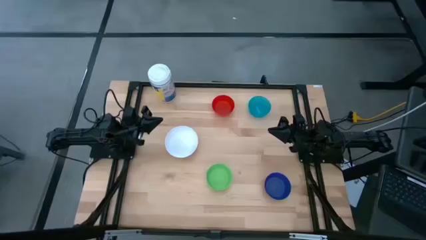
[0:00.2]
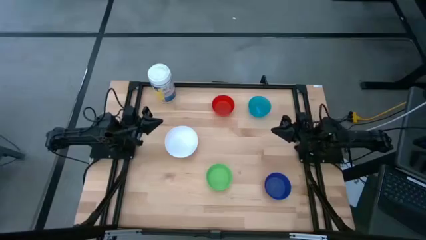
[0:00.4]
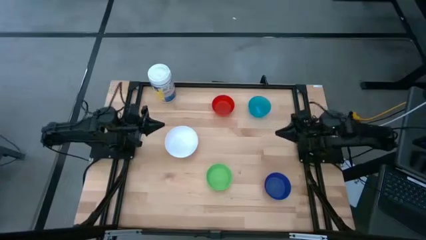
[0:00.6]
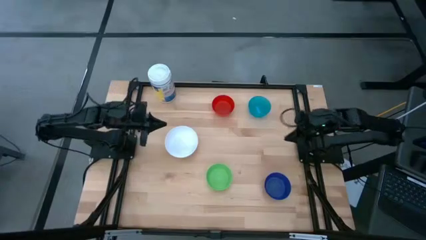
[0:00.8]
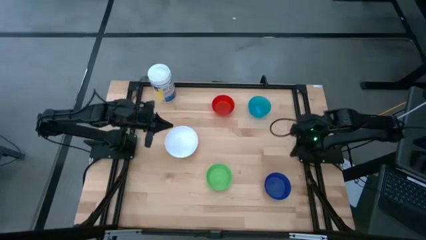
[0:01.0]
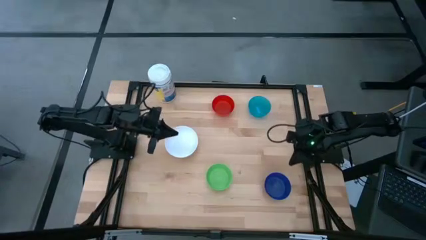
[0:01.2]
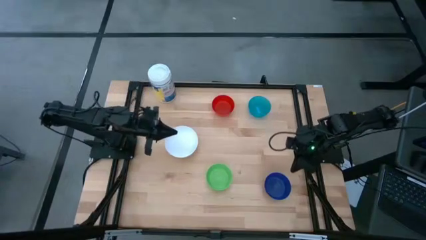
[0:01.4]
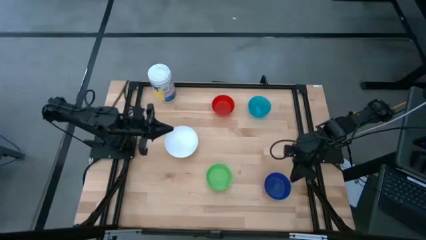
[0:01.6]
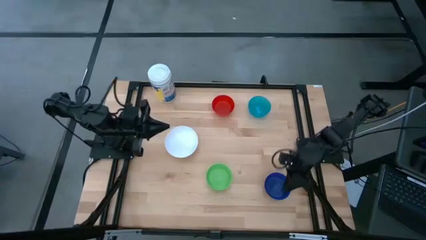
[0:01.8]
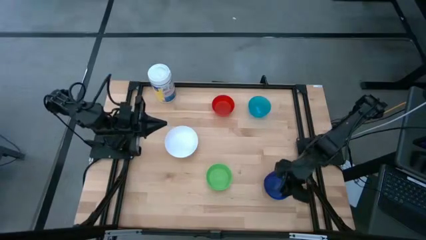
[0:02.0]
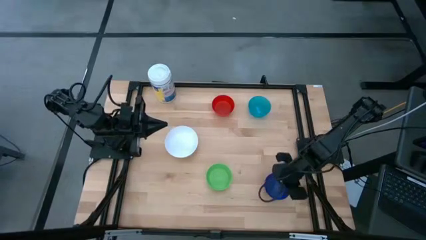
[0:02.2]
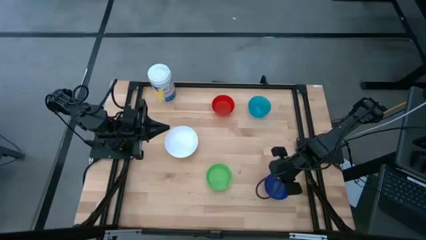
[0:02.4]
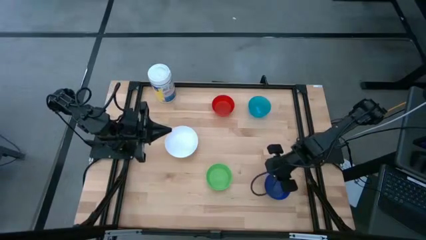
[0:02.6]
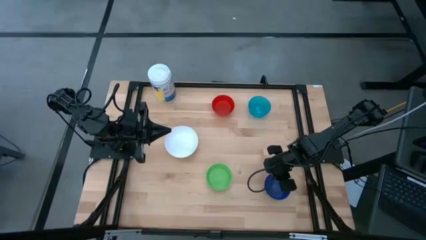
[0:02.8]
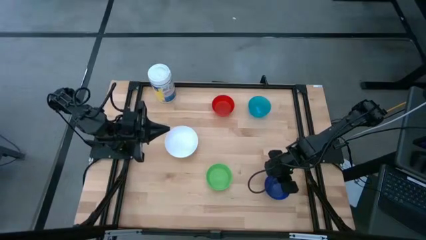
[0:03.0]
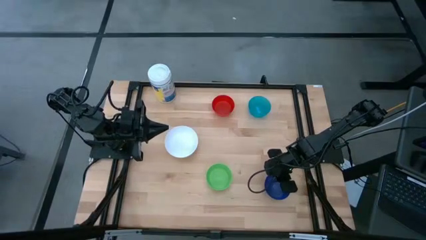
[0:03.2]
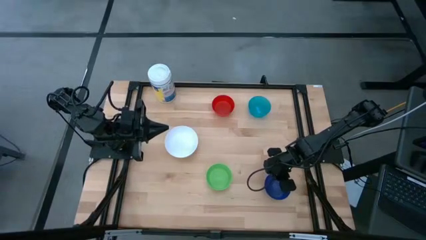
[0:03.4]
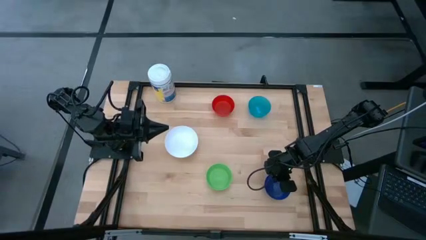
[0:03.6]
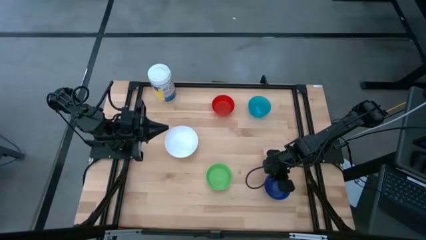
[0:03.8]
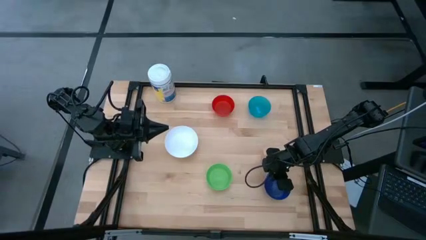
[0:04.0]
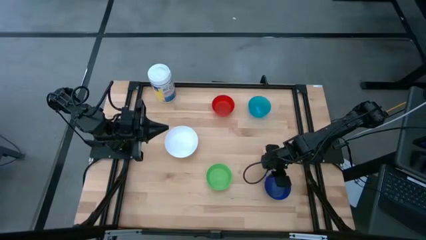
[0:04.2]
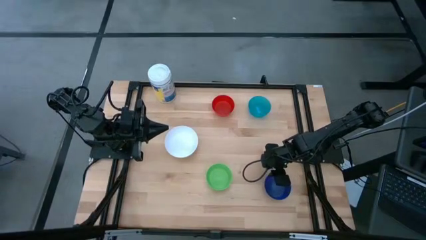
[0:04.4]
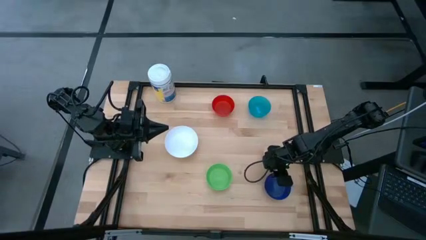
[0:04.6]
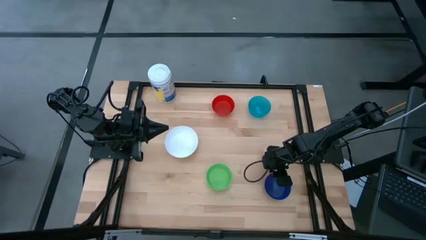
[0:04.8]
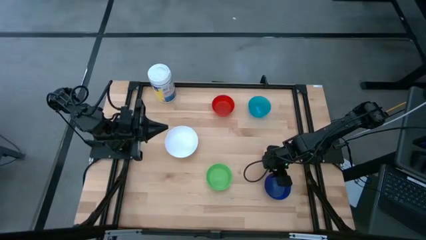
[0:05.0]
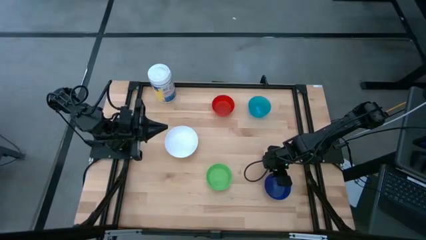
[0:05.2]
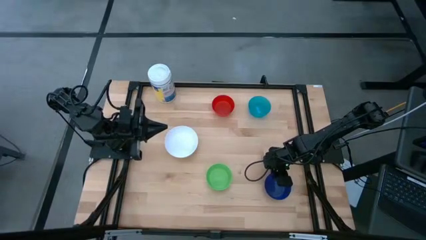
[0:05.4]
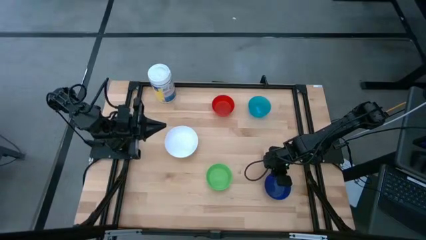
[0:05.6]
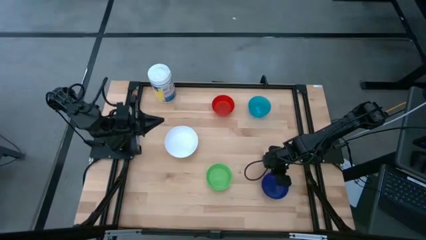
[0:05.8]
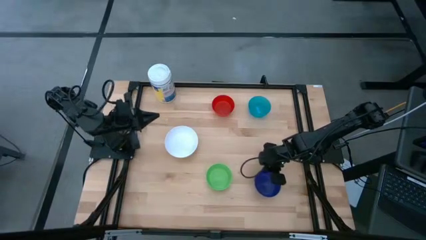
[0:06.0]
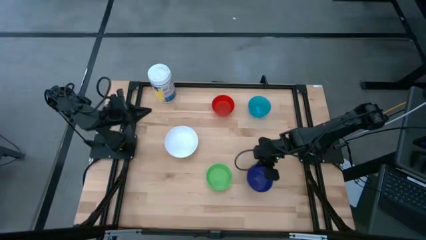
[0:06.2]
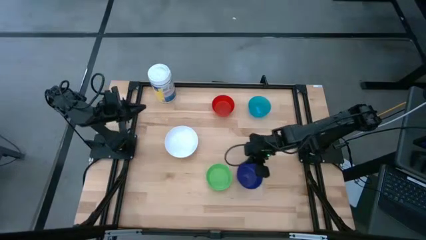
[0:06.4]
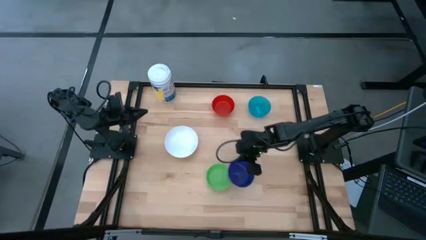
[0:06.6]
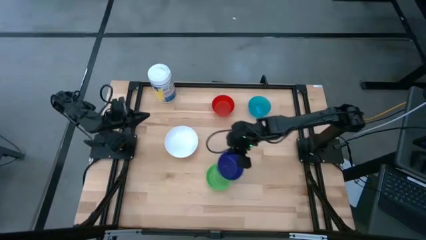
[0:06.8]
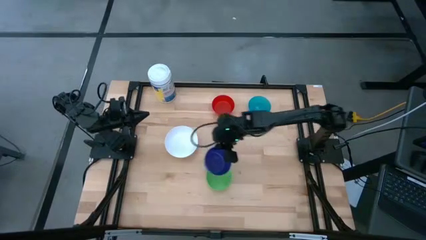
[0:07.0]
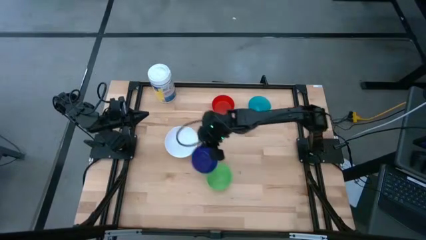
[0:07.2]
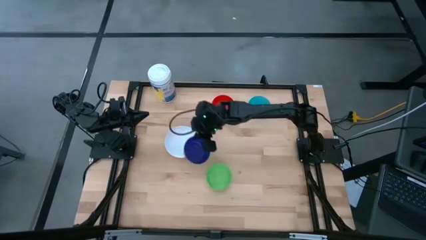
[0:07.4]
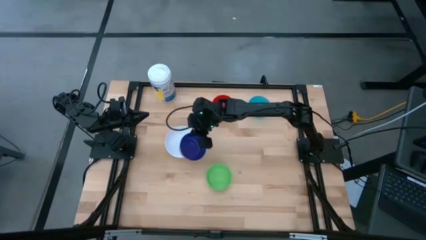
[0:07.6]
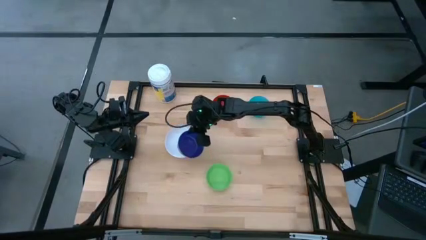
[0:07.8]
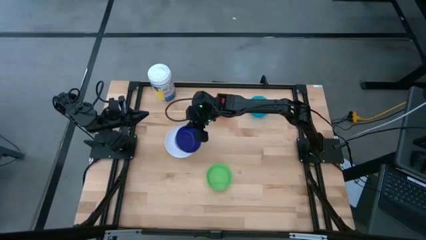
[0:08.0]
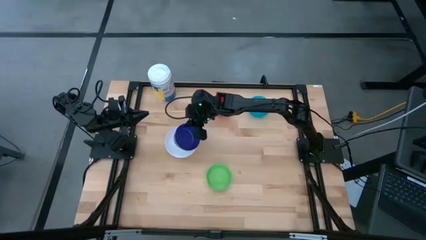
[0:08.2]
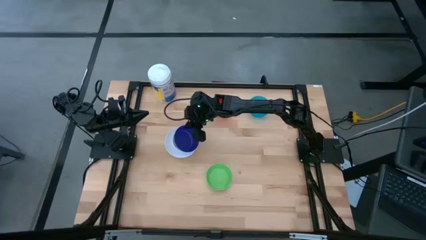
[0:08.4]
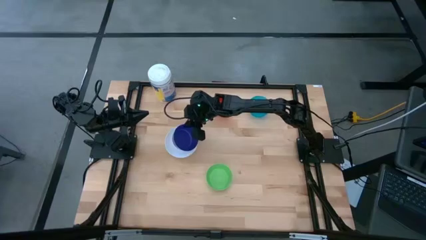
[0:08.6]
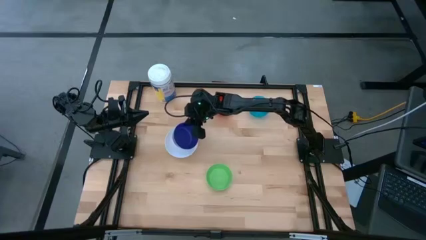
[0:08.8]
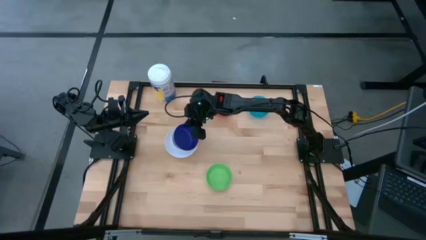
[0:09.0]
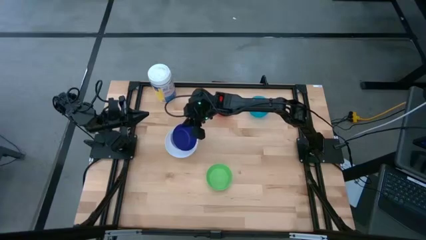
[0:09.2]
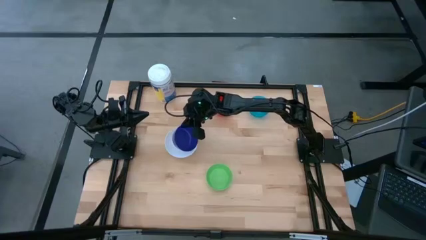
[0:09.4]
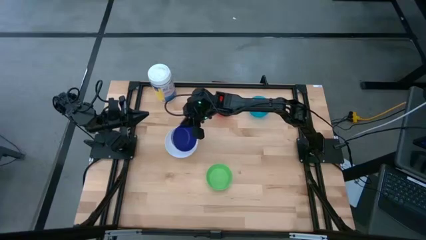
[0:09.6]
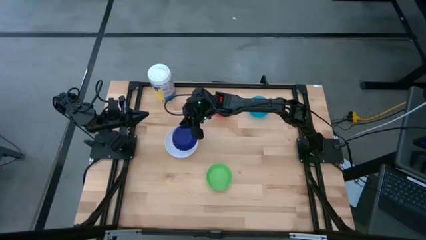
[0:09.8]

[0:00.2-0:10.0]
Stack the dark blue bowl on the white bowl
